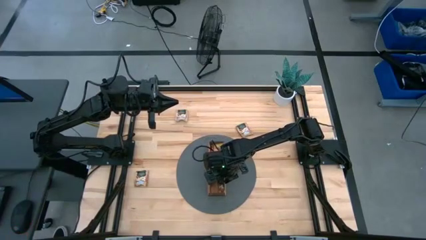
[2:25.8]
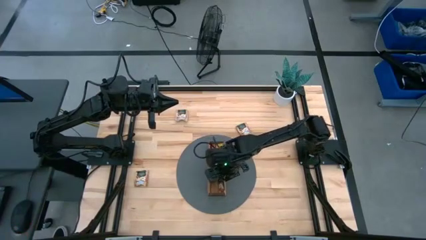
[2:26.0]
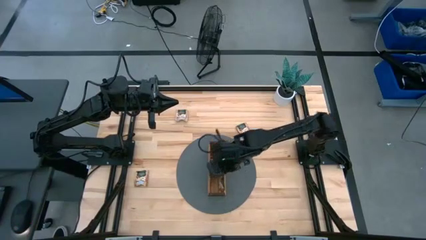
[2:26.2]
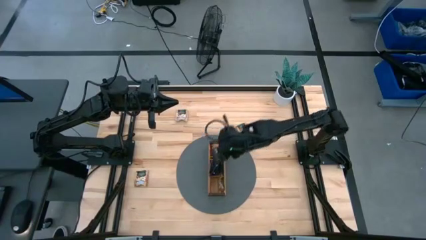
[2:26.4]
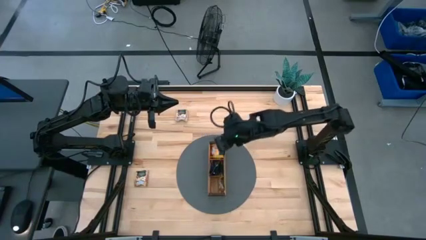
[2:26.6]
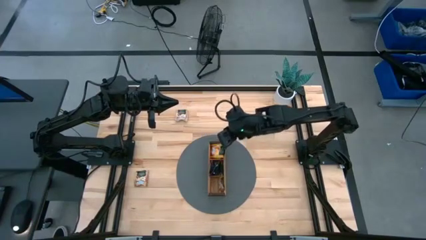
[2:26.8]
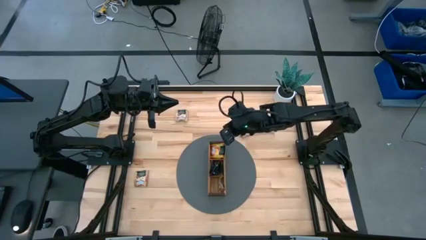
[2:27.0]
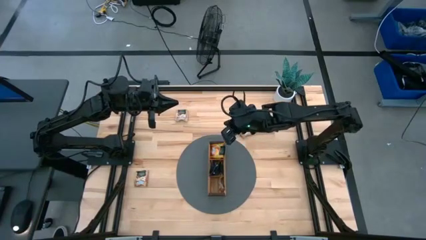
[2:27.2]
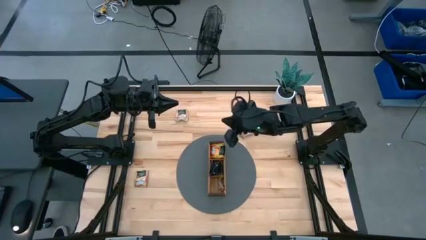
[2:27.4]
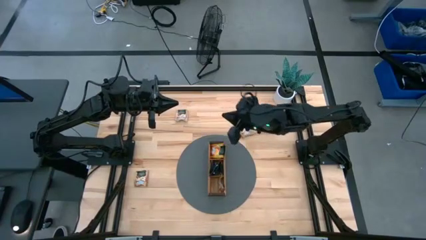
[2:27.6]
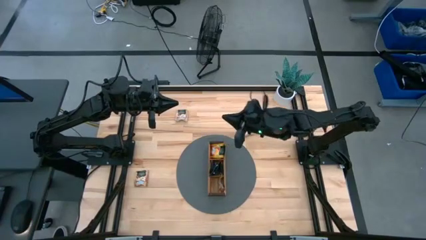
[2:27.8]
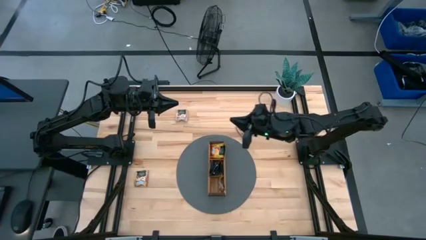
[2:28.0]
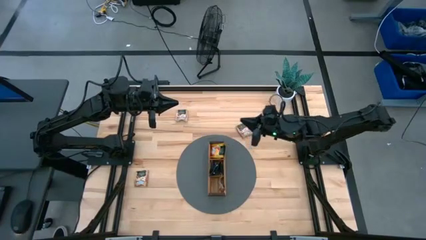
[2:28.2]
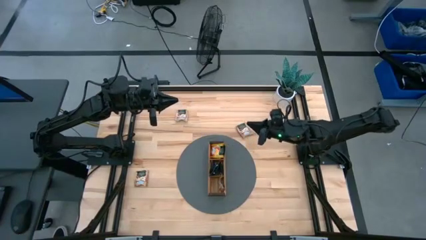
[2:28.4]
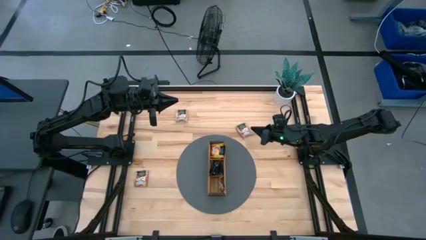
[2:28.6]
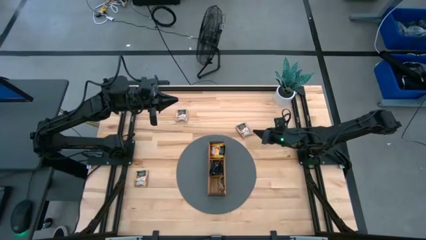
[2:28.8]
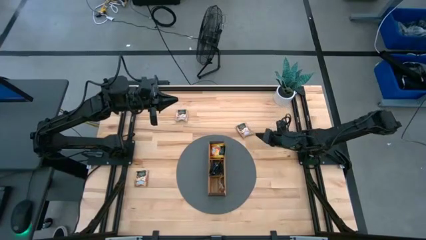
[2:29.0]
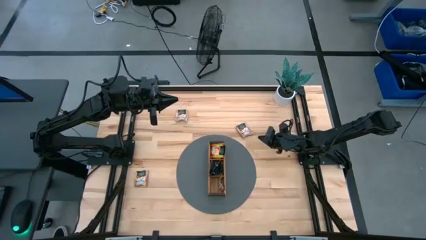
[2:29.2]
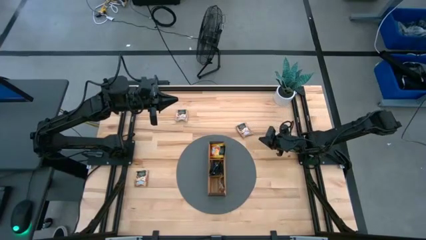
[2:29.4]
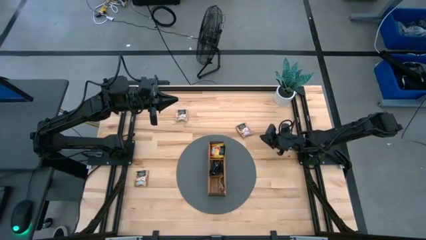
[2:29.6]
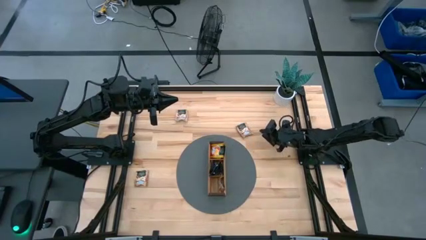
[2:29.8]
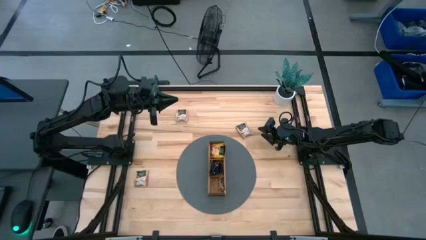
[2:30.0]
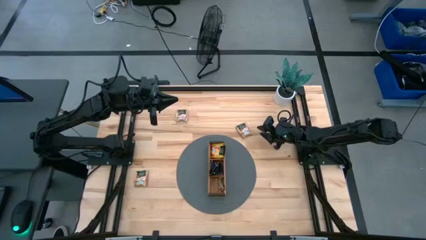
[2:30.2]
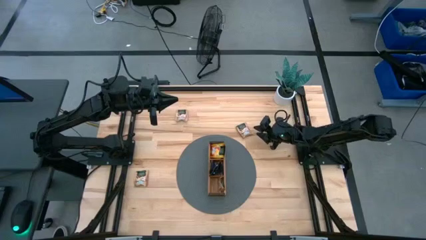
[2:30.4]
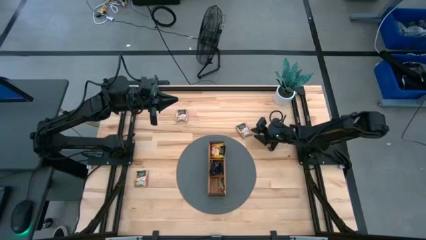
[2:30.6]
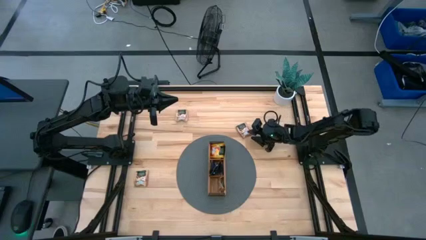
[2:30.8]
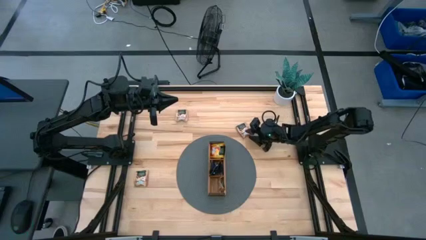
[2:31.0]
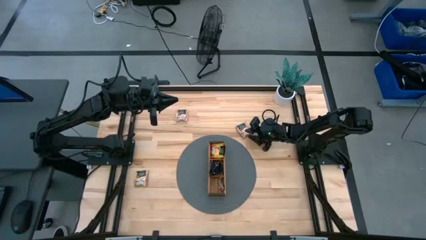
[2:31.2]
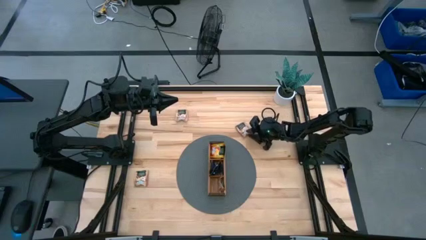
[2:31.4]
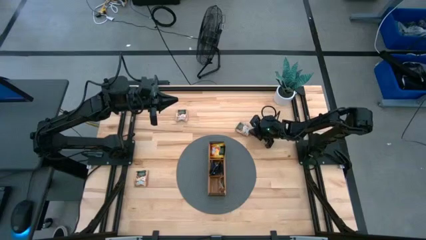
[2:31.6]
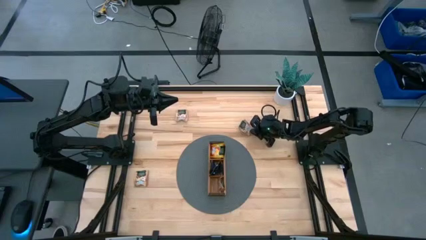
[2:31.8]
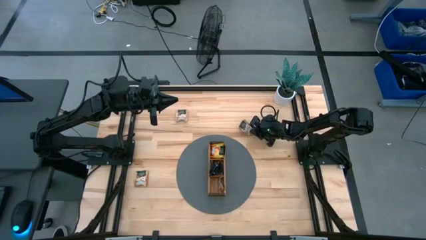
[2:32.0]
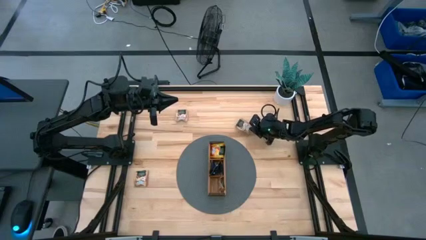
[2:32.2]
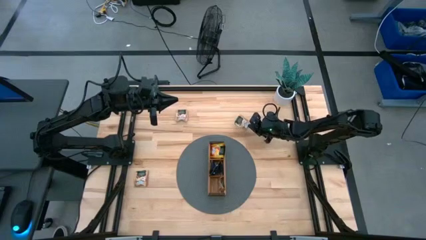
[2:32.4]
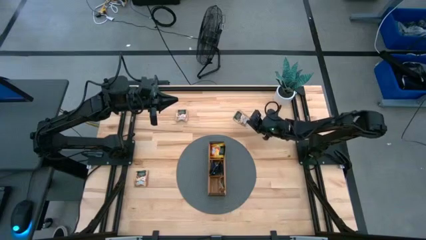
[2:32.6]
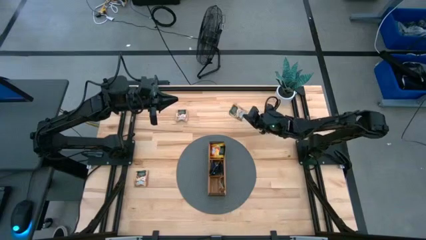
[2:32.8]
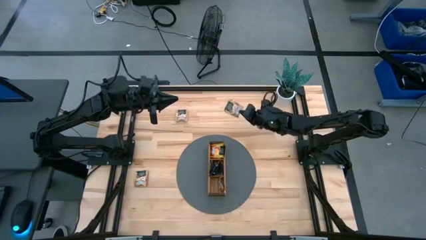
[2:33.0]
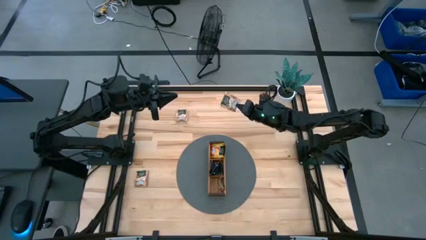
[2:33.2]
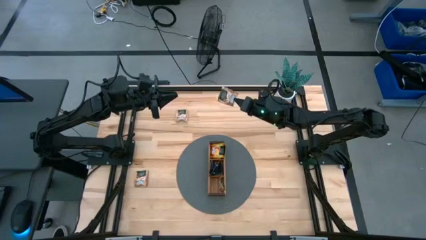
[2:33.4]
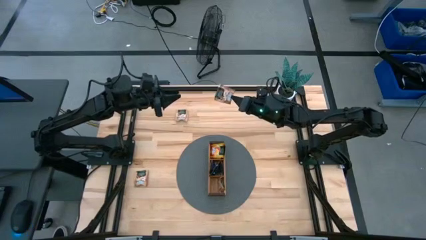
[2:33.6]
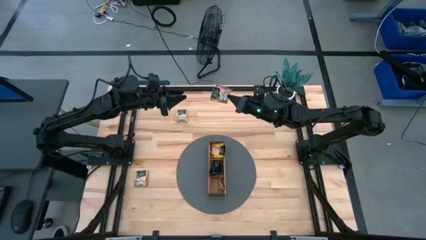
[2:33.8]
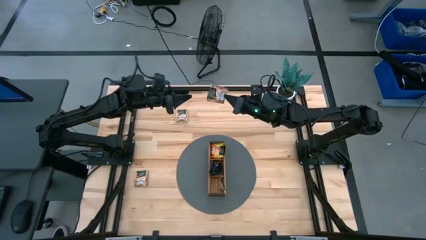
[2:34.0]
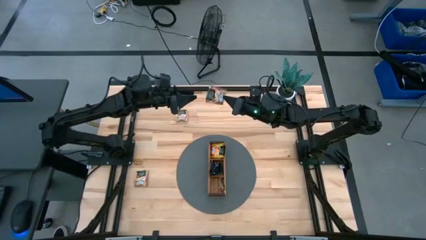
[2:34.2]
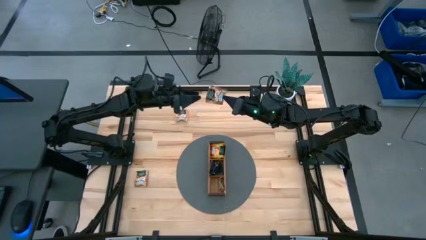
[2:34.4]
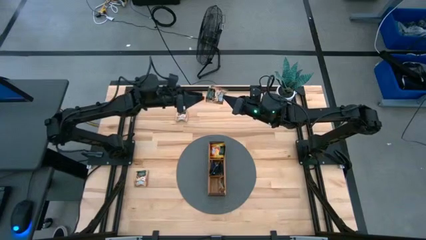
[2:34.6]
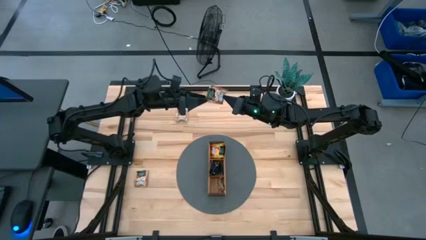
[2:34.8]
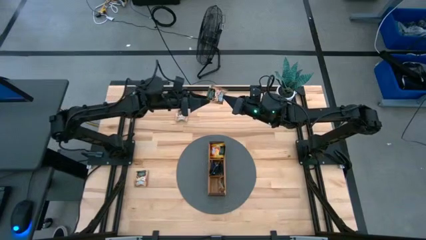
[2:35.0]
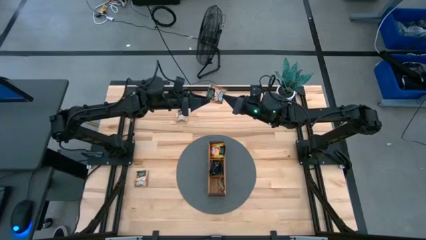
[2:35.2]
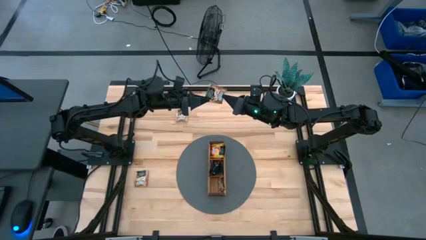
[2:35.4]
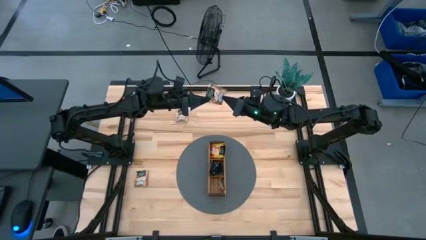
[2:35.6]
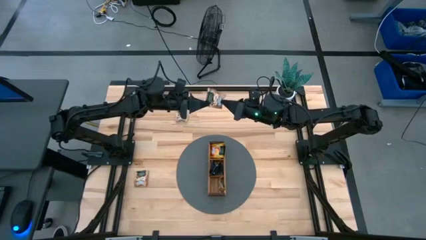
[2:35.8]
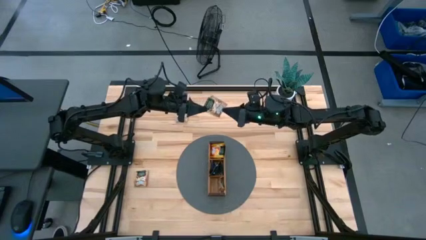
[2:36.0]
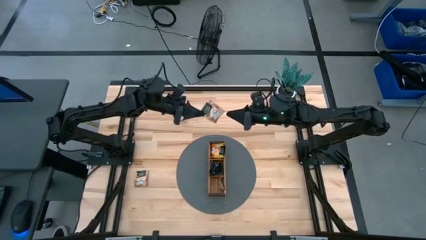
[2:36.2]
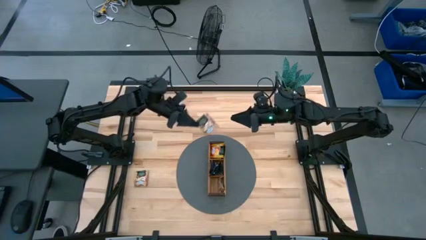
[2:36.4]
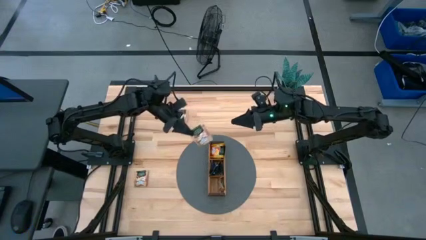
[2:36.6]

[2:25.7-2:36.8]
Task: Pick & Place Tea
Put the brown tea bag into the bottom section of the wooden organizer

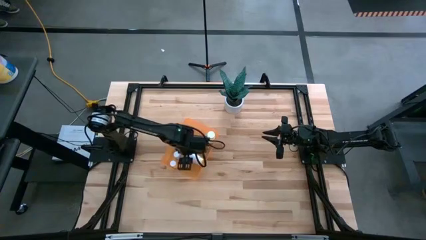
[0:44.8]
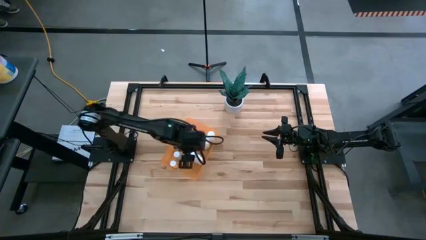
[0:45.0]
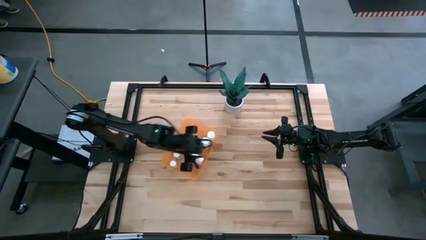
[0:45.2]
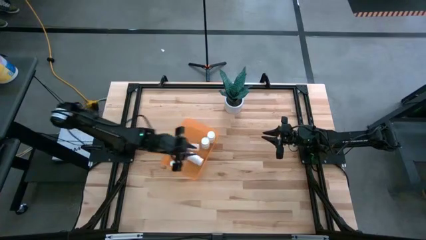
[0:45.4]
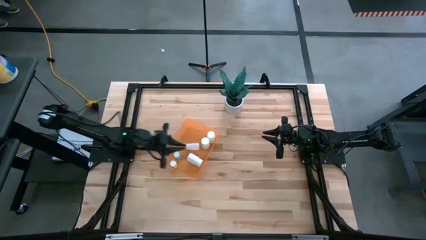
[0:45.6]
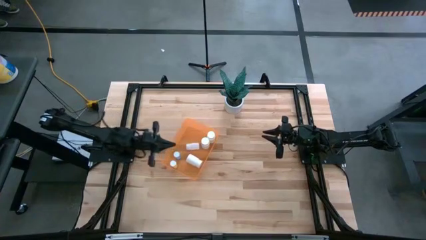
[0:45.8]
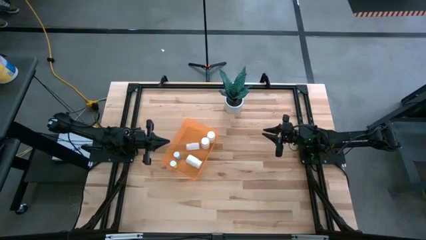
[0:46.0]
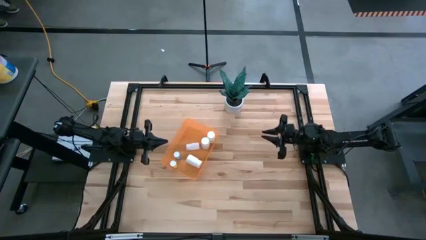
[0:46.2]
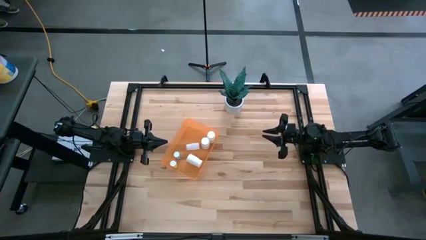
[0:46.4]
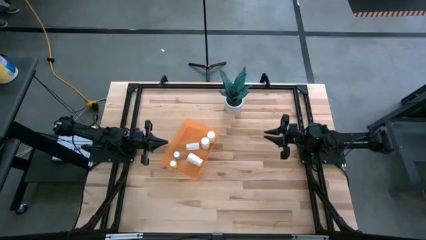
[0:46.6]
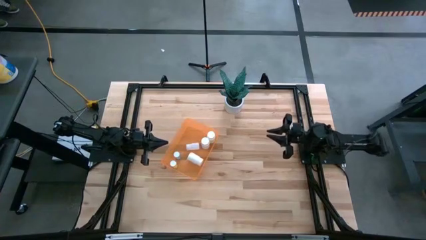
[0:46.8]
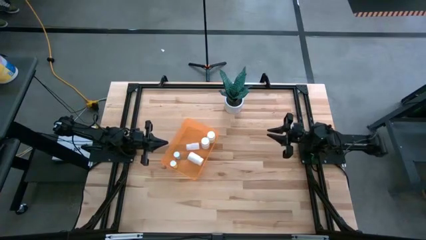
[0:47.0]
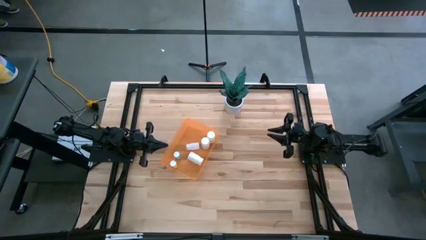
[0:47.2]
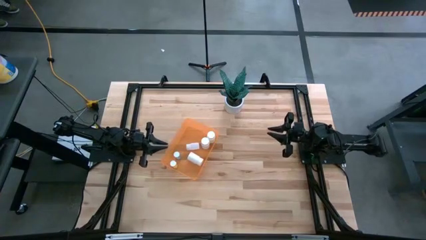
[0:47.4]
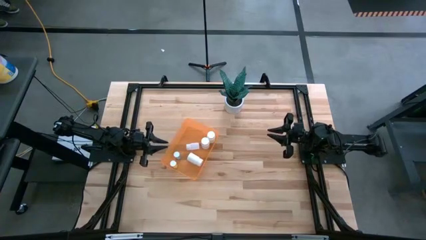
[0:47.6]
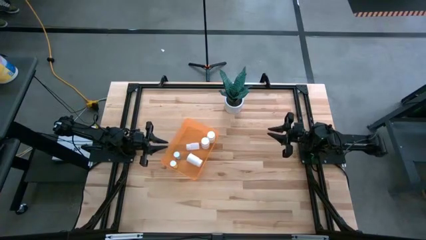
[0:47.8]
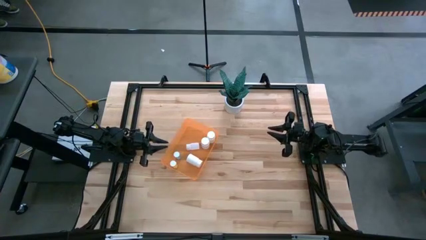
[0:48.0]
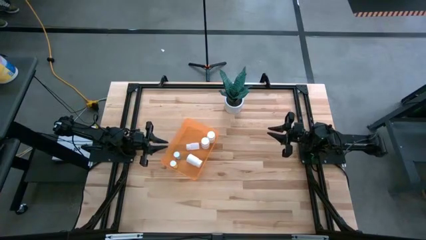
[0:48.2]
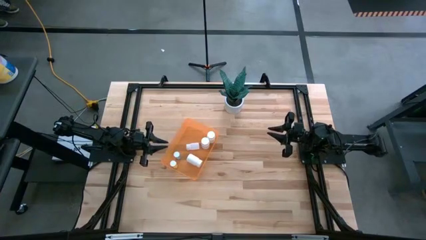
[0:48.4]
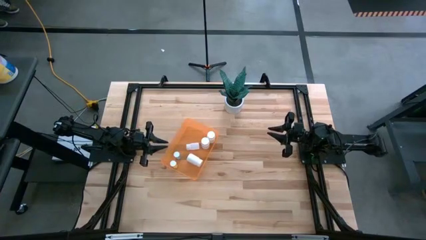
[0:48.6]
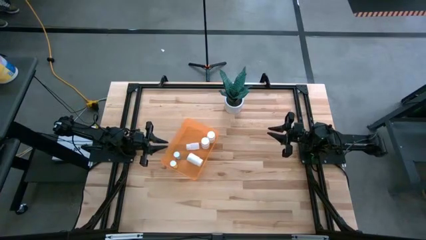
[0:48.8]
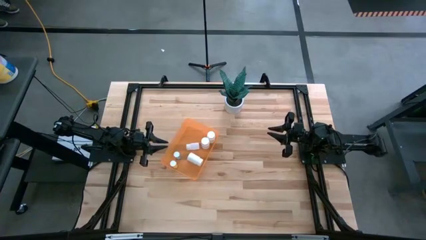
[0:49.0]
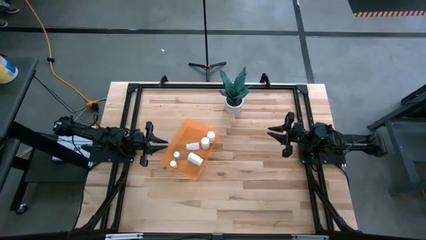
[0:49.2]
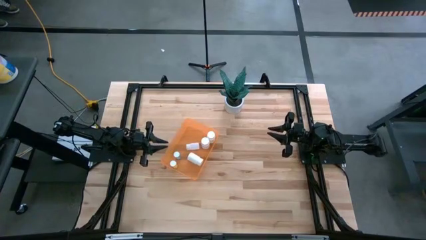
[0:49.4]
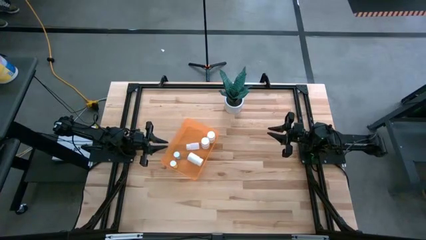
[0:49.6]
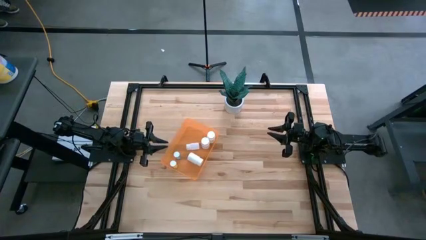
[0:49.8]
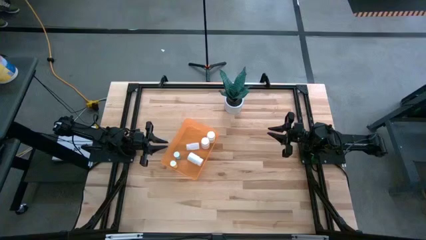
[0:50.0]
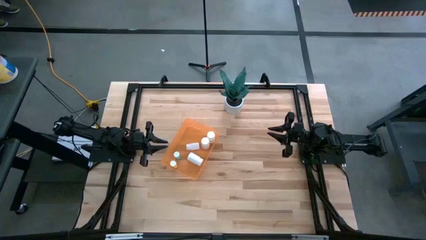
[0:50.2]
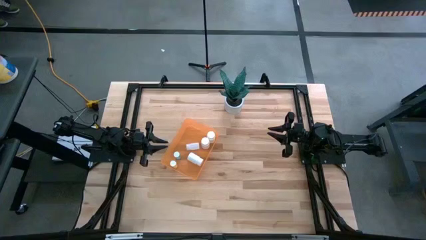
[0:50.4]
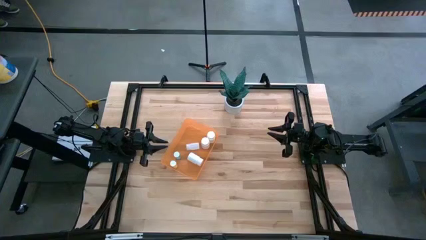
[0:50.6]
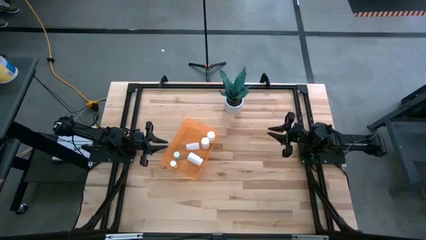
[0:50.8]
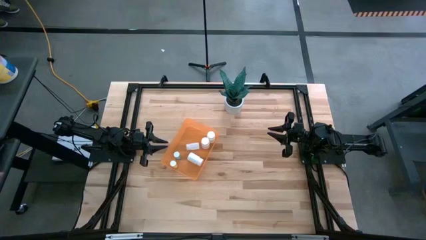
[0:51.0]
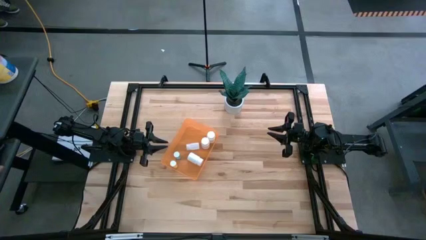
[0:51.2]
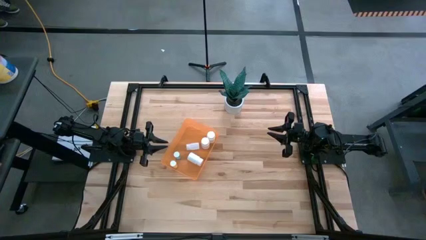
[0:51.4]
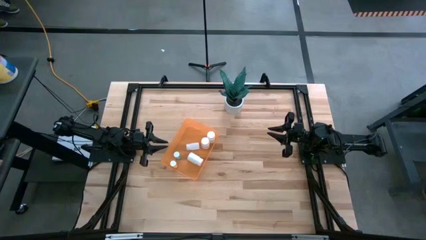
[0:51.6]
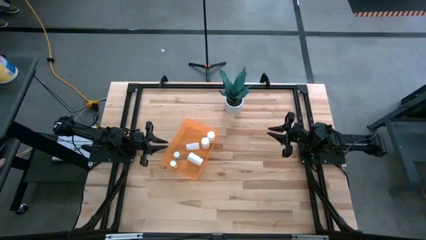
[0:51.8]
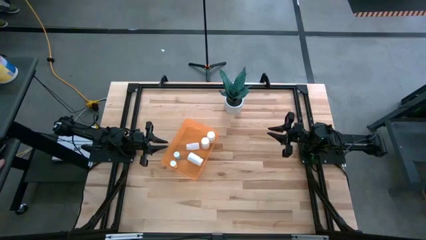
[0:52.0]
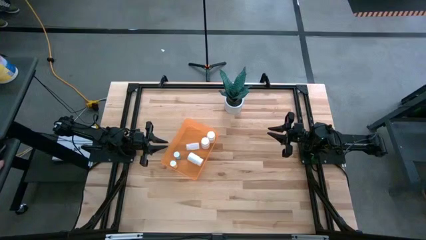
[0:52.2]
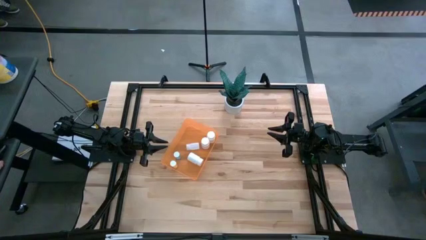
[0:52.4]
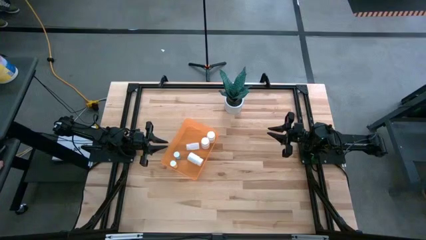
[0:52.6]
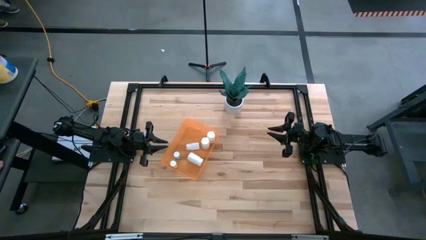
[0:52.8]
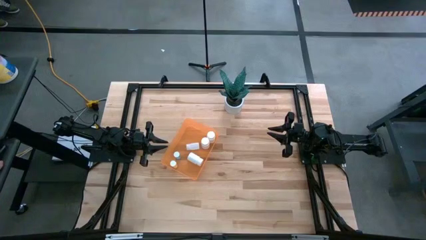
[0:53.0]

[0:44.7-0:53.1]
Task: Pick and place pill bottles into a basket
Return to Home Position
